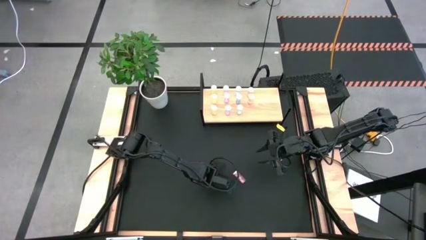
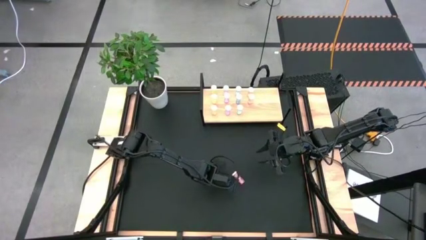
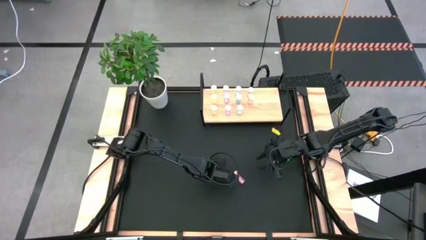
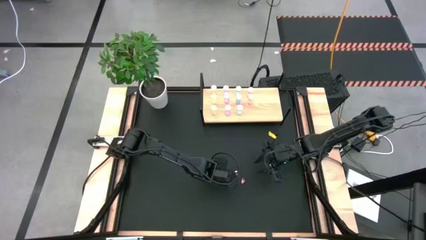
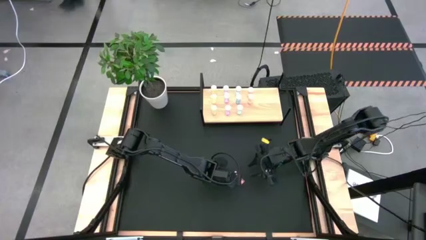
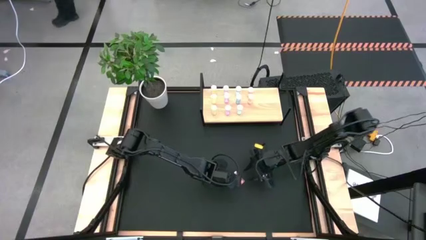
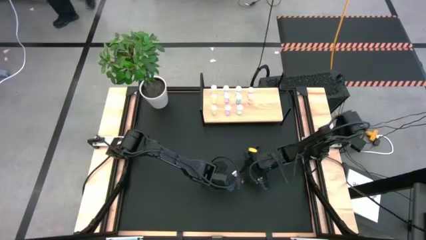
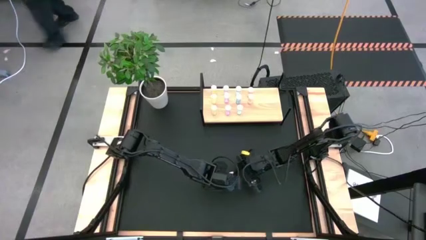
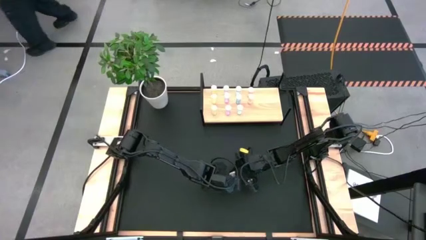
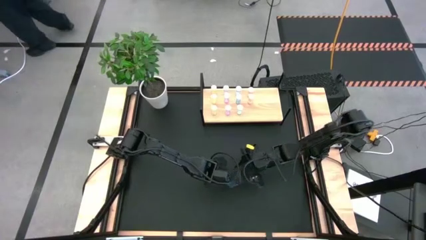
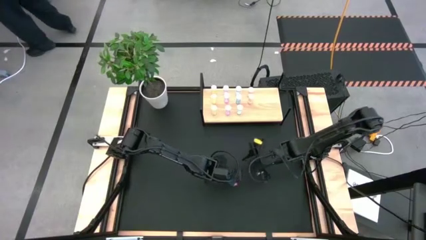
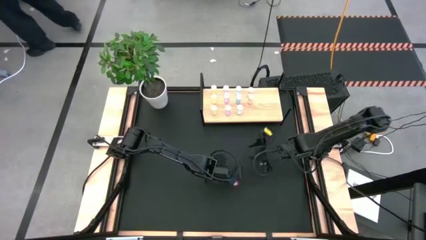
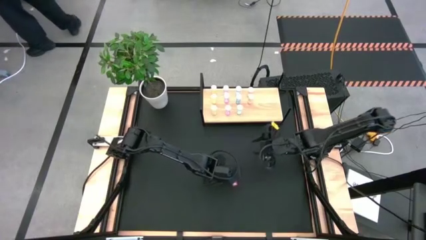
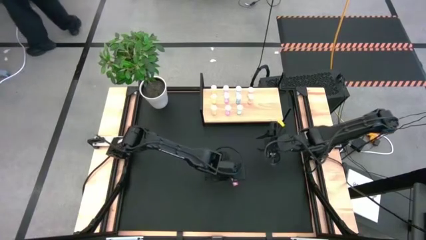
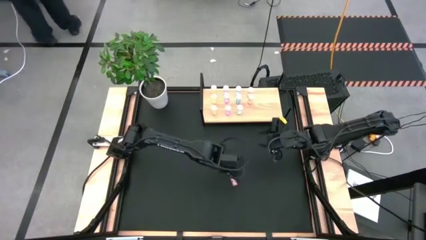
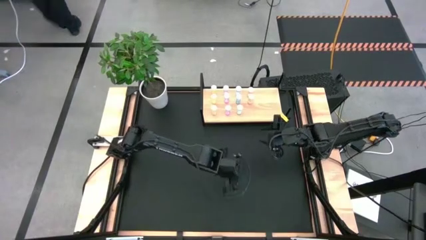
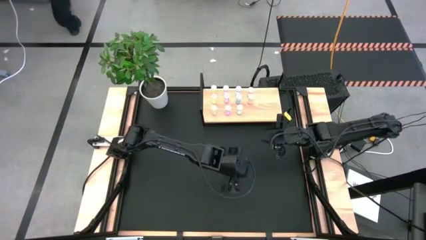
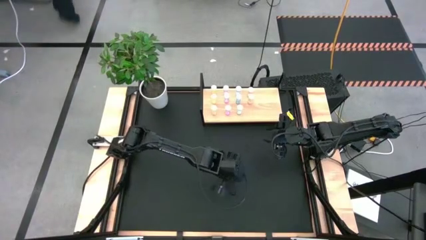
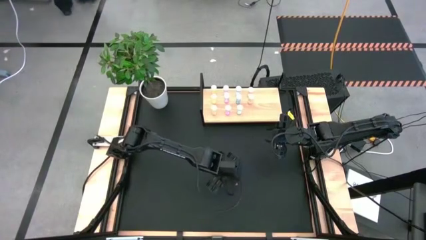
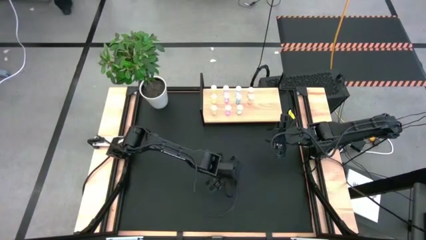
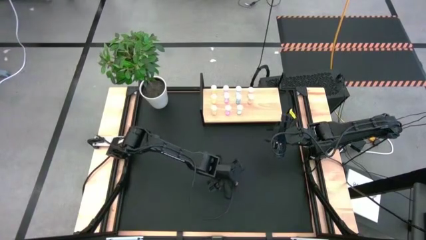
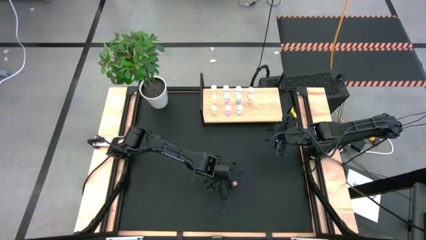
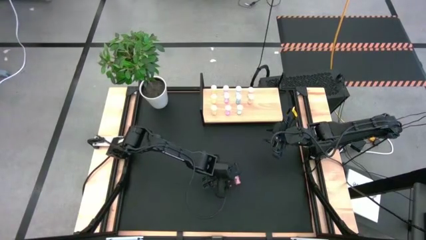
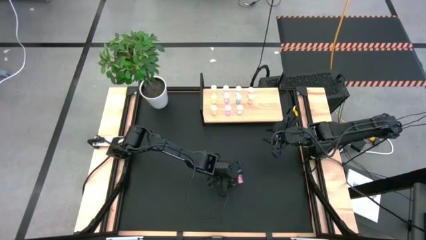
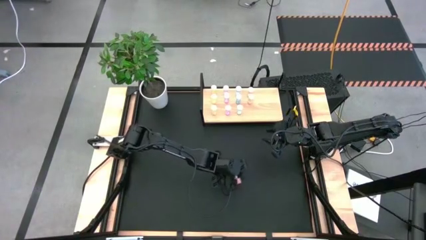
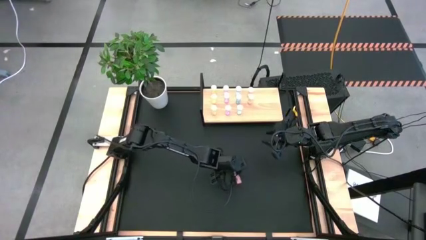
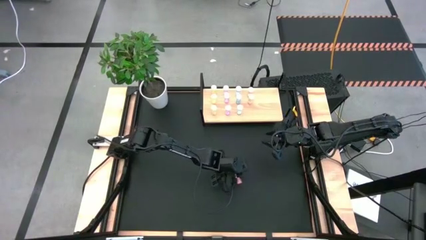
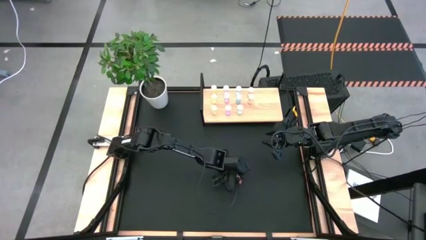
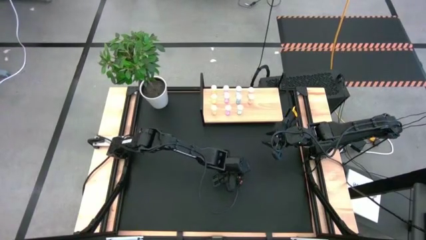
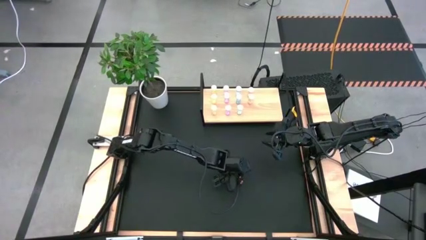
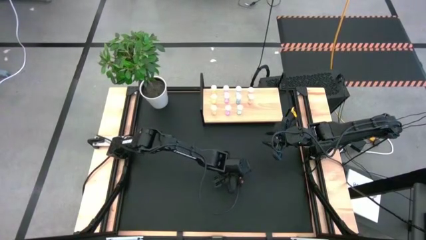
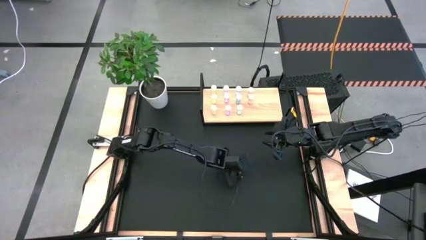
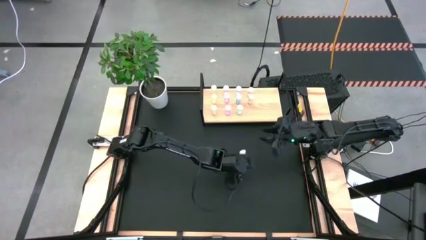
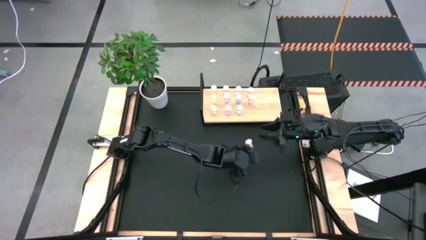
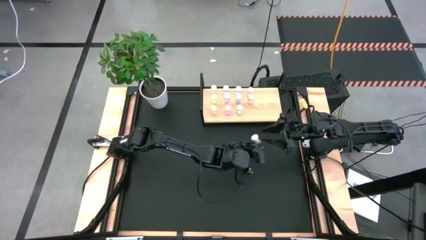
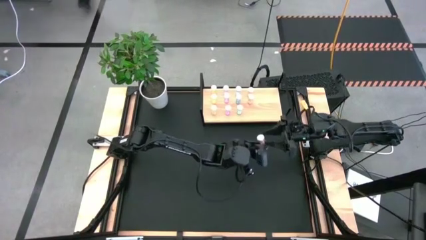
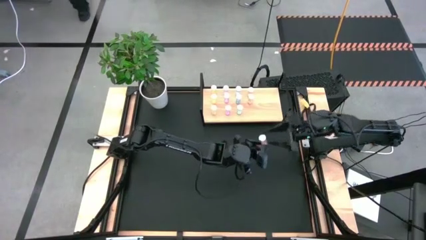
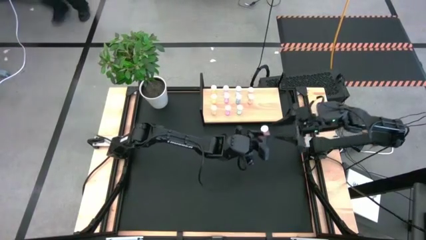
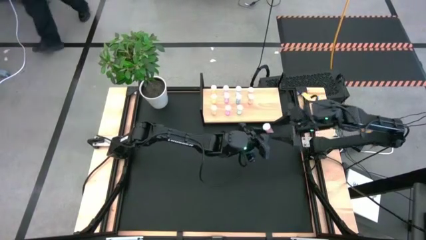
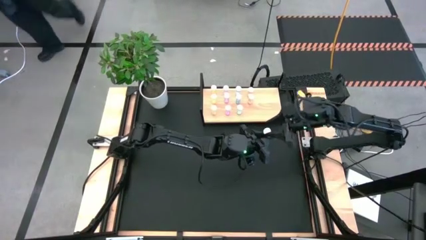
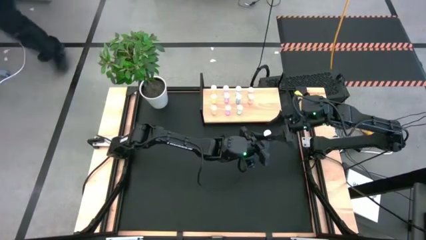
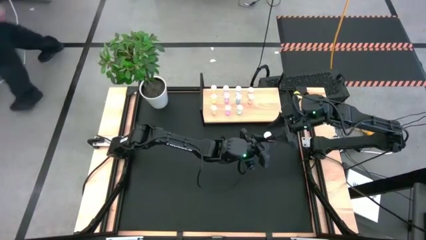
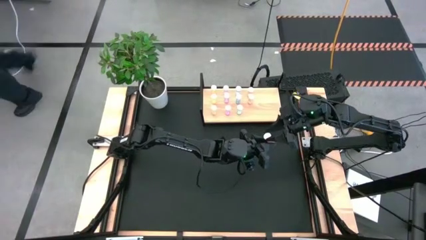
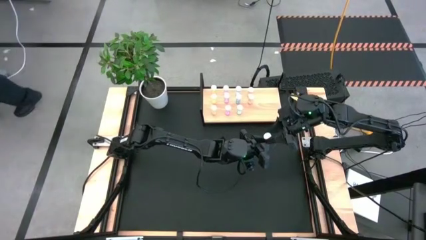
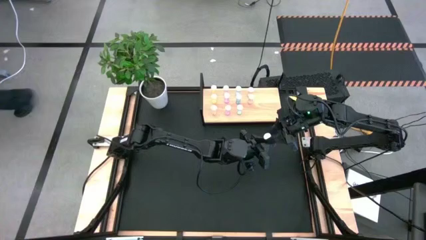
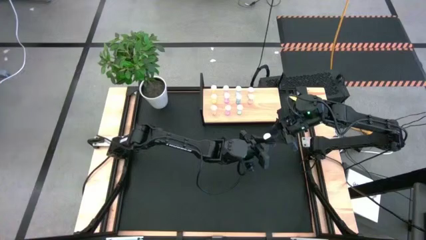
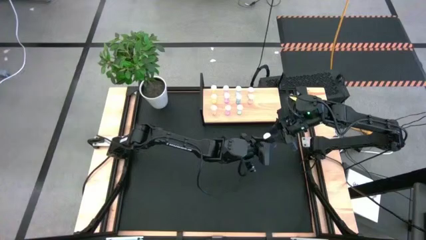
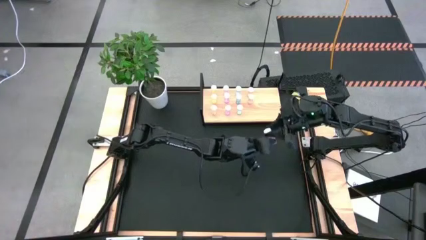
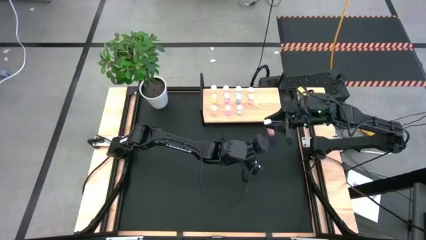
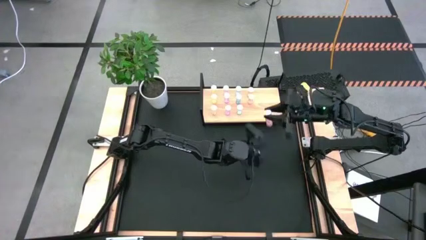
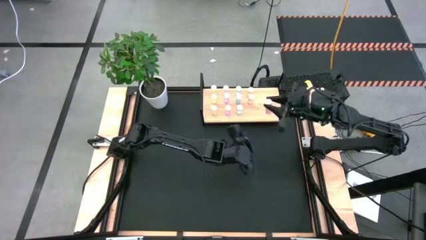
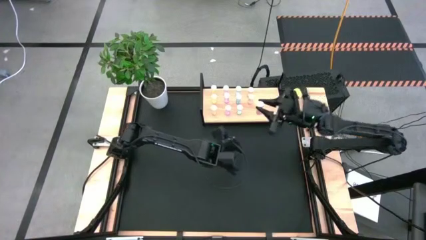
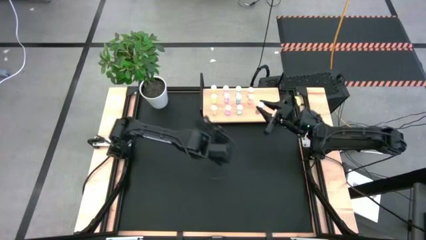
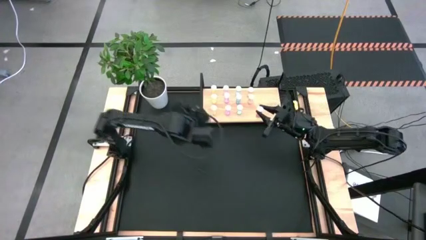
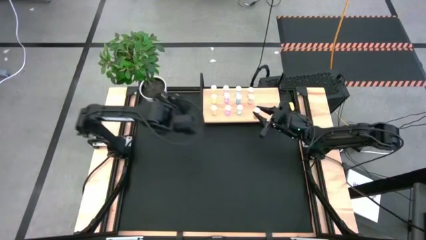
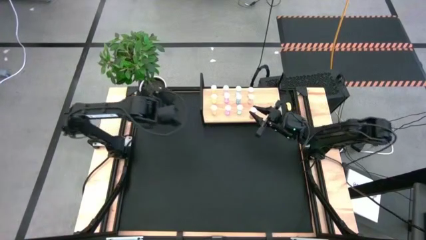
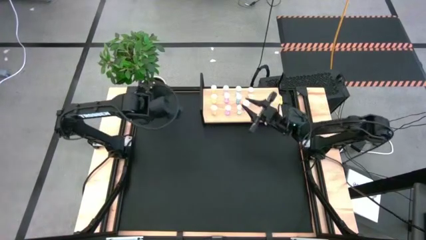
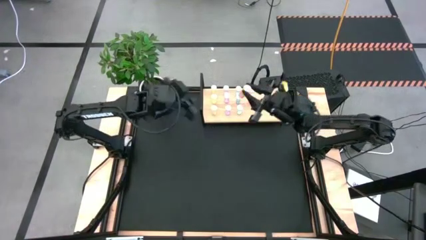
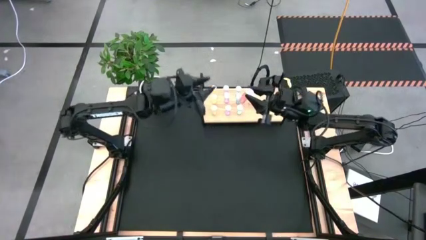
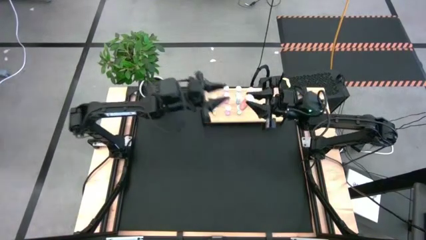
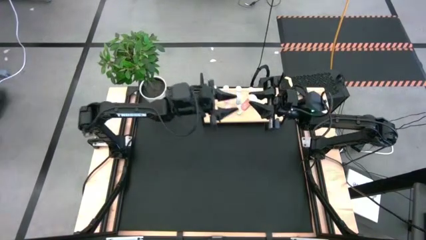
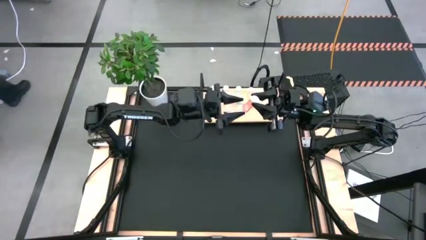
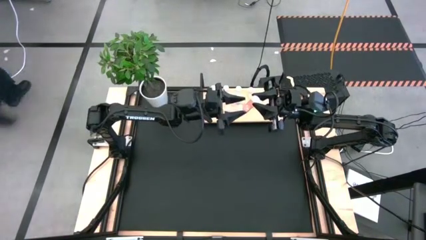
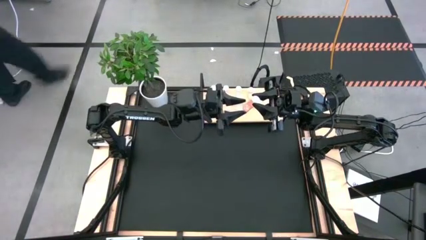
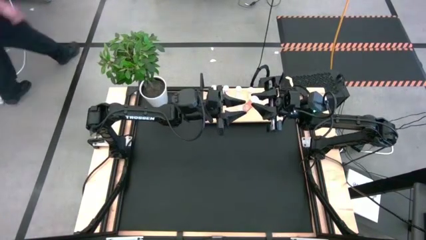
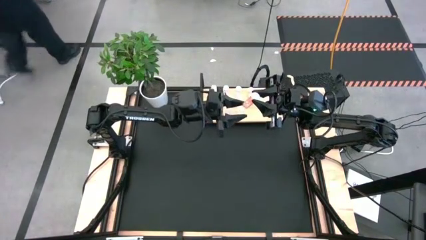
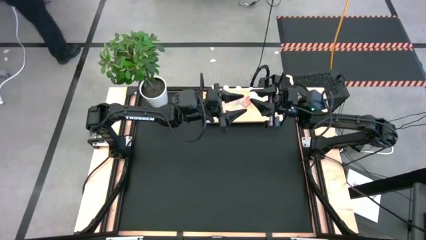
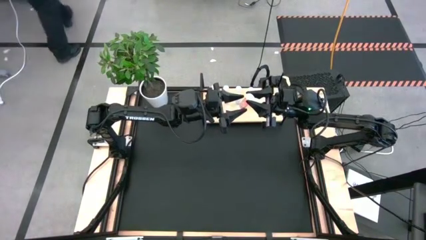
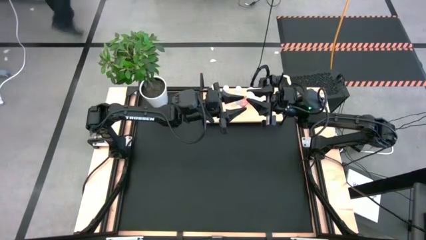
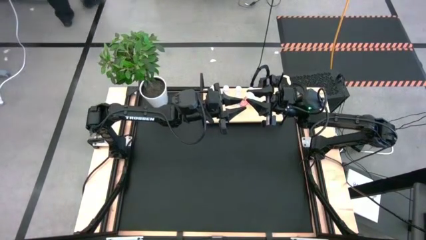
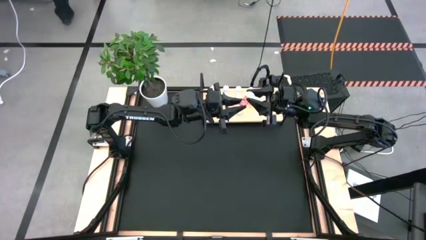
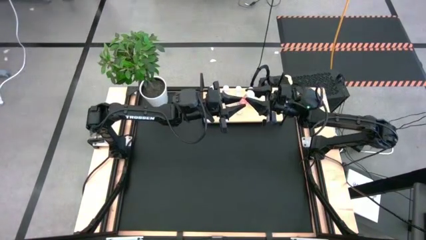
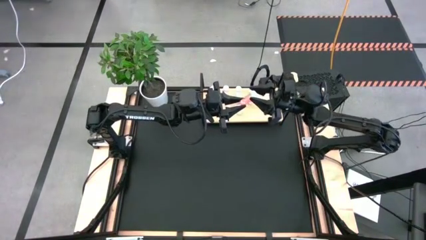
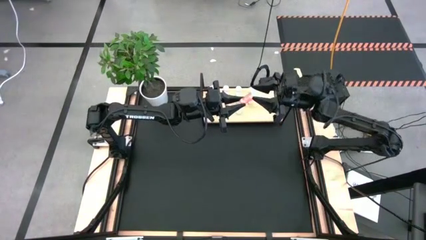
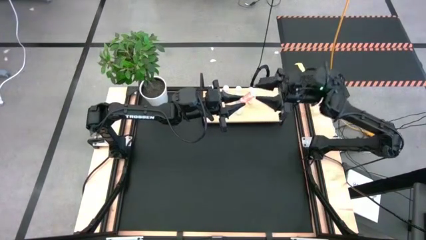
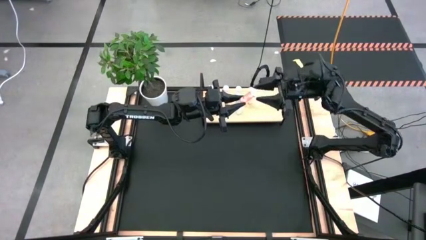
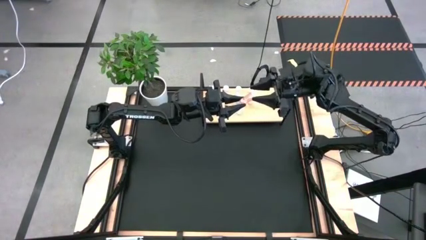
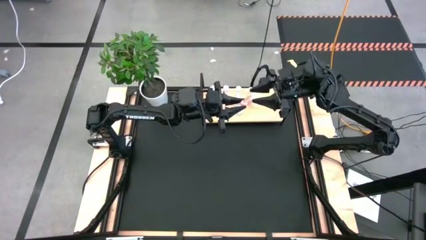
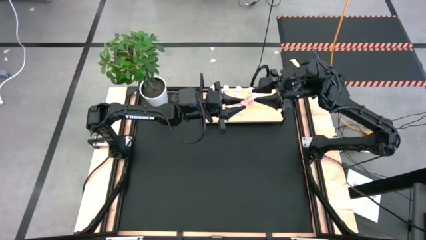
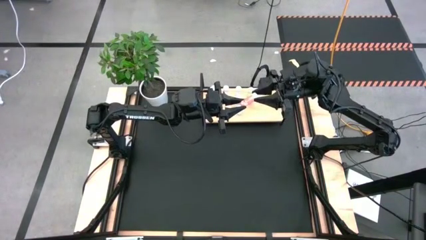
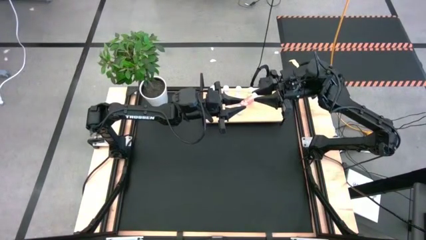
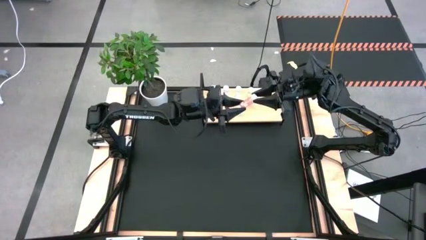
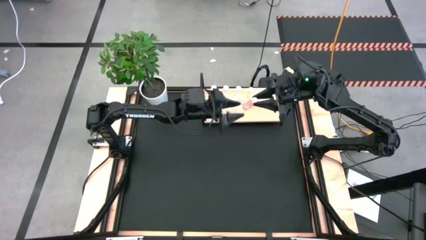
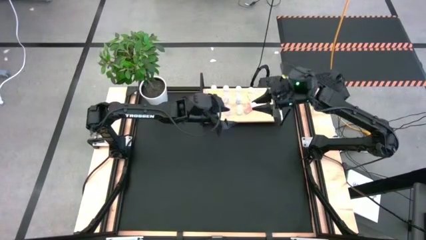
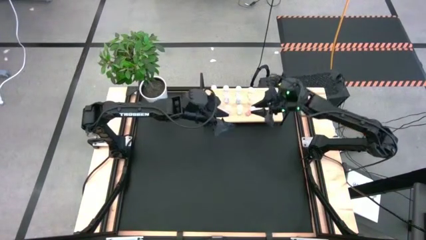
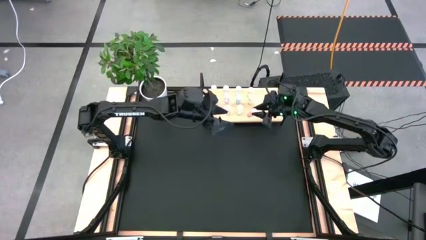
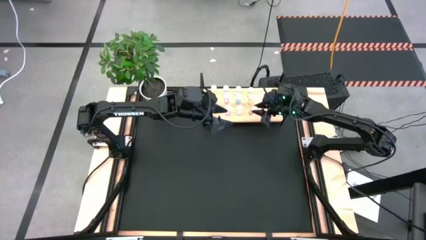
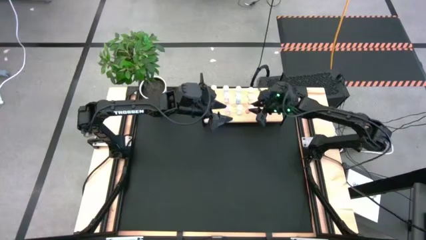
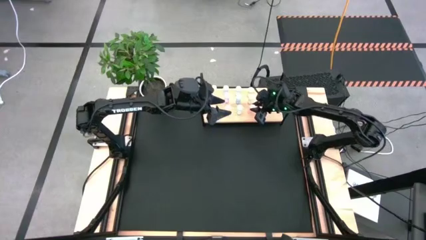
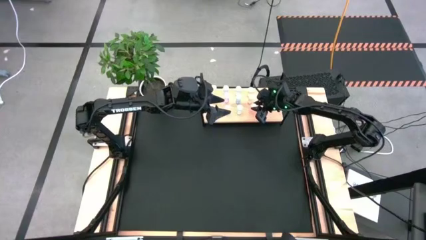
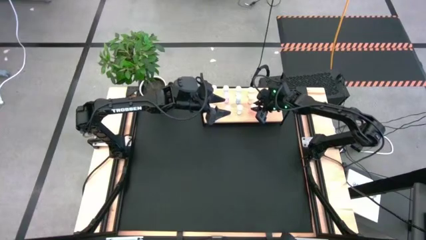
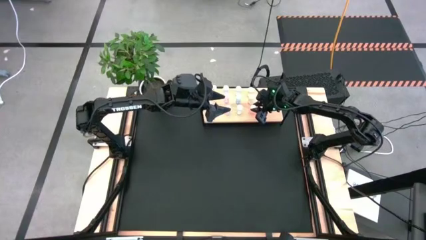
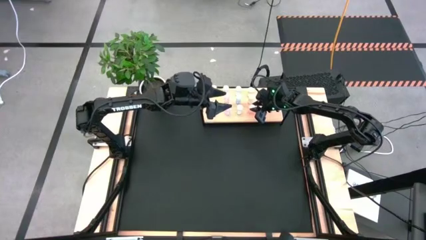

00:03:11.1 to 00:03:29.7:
Task: Pick and place medicine bottles onto shelf by color
Put the orange pill bottle on the shelf aligned with the other orange pill bottles
